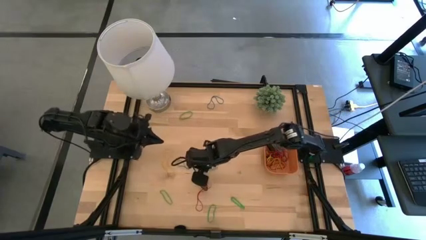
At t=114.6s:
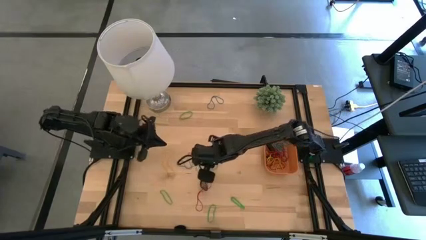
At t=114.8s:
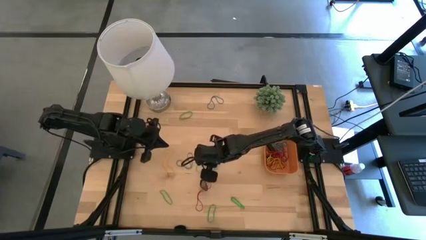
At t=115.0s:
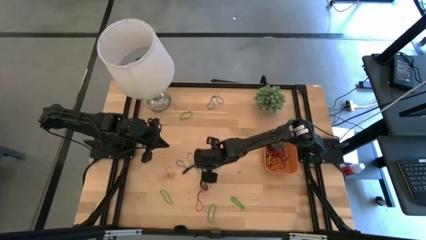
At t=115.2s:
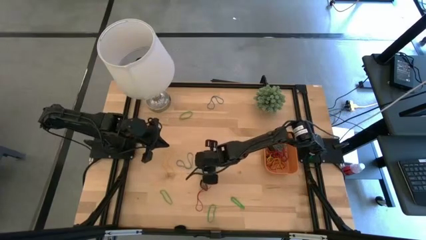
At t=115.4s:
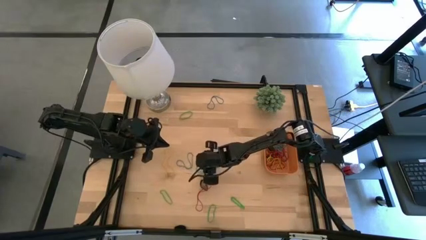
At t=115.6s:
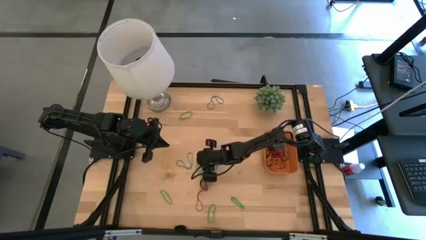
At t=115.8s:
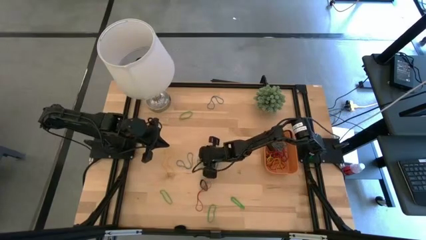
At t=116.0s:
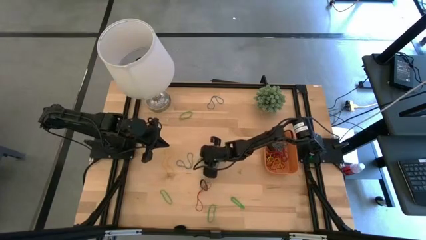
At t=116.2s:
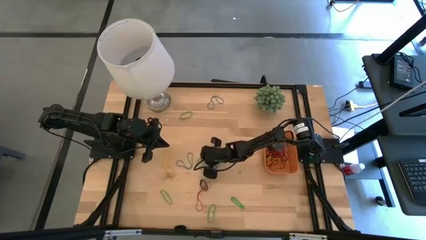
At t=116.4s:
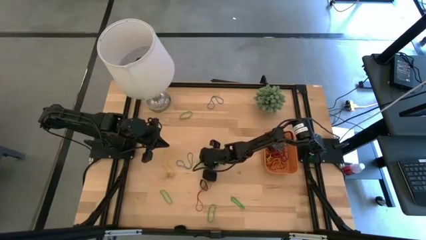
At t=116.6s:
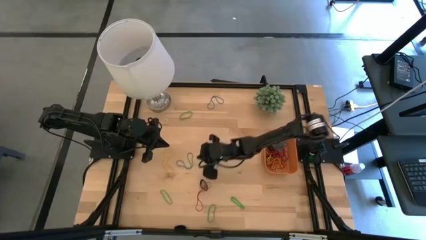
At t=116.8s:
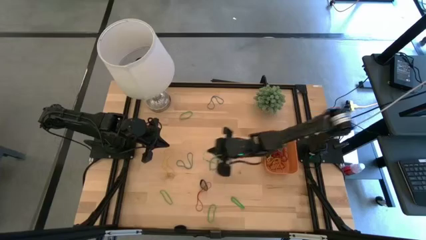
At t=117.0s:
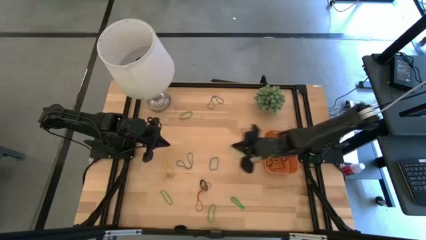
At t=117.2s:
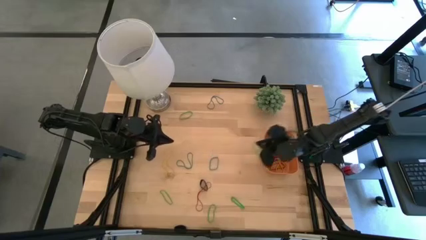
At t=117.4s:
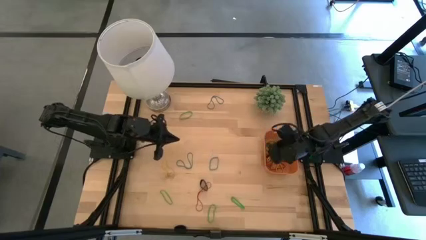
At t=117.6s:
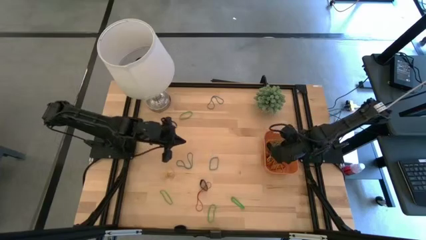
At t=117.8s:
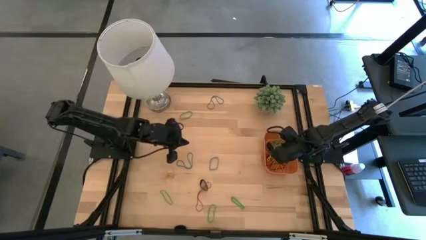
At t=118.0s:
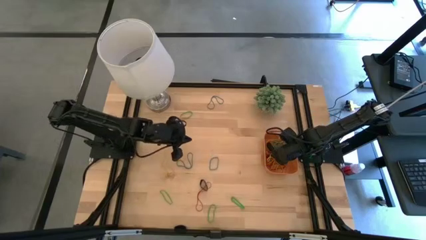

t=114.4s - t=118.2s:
Task: Pick and place rubber bands into bin
Put the green rubber band into the orange bin

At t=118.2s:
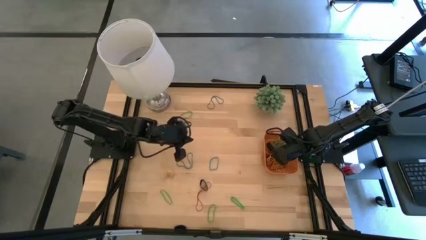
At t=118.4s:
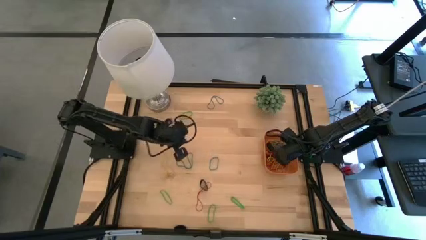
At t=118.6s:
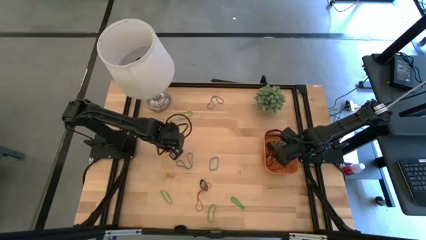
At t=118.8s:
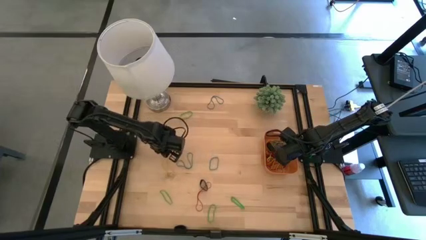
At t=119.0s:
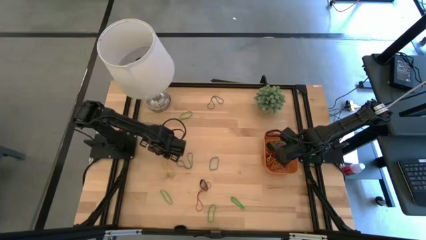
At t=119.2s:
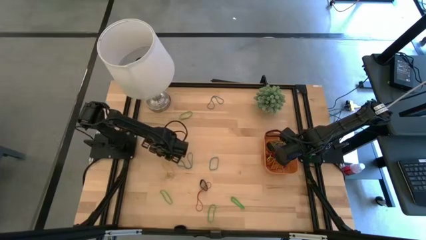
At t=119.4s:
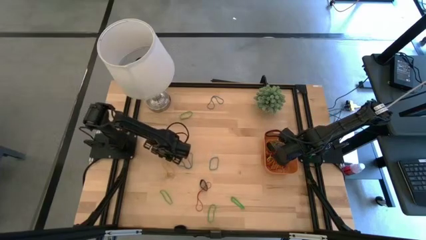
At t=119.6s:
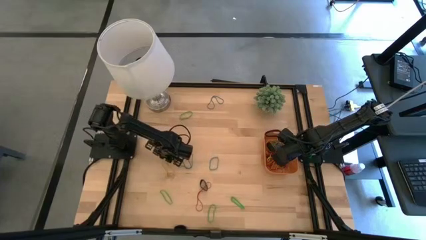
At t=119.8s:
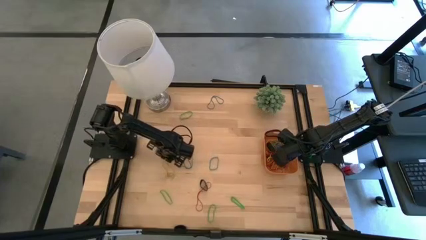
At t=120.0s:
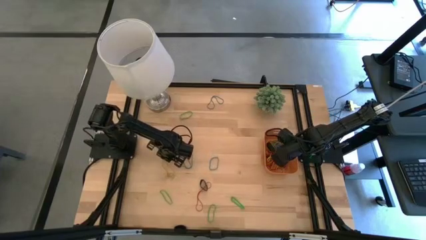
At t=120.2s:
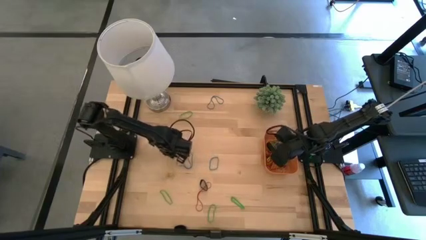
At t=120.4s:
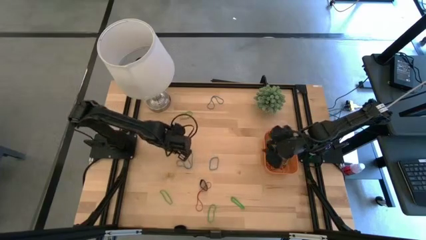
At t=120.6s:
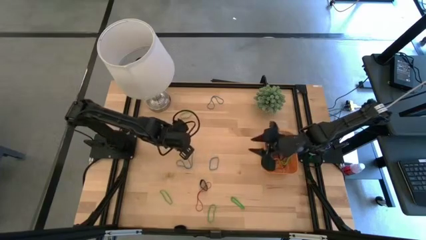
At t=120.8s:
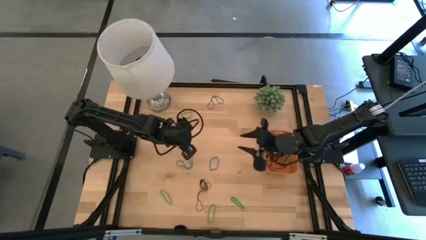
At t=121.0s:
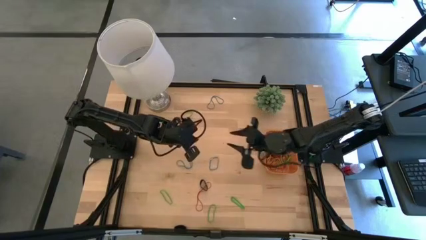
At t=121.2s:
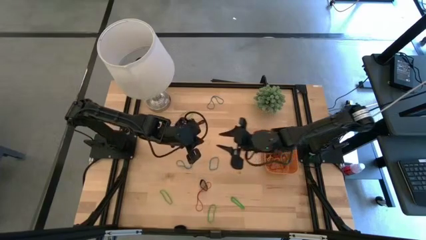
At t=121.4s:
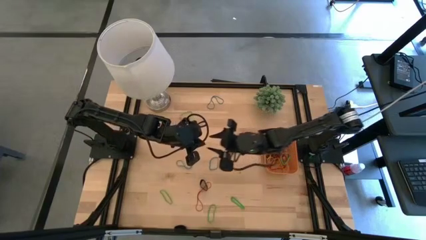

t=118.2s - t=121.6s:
Put the yellow rubber band into the orange bin

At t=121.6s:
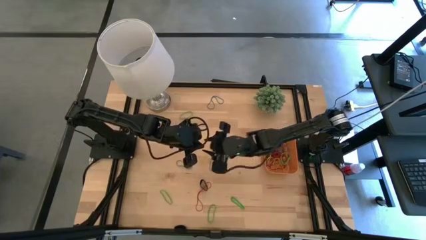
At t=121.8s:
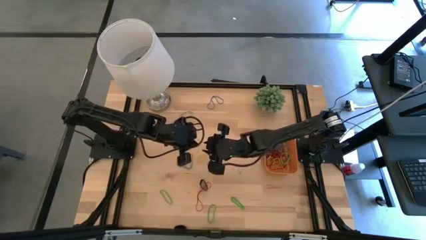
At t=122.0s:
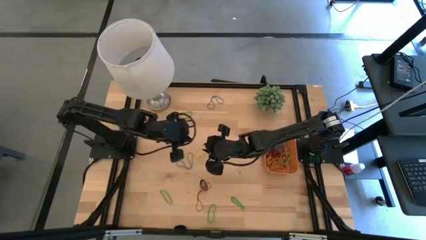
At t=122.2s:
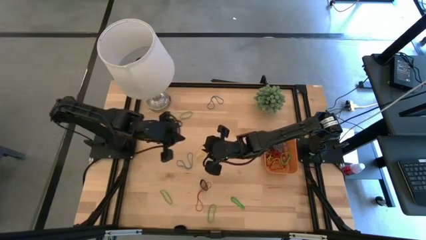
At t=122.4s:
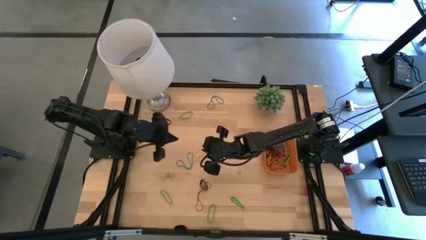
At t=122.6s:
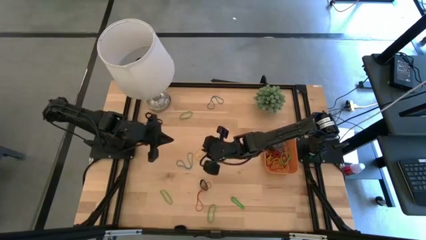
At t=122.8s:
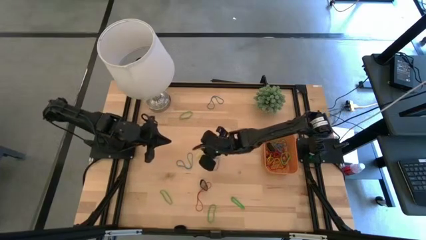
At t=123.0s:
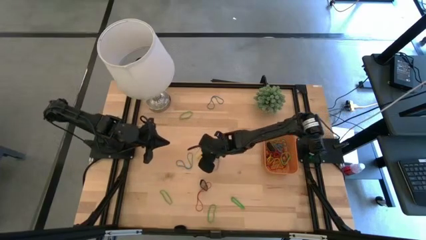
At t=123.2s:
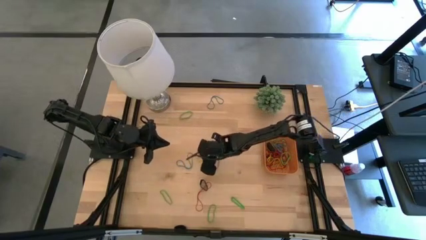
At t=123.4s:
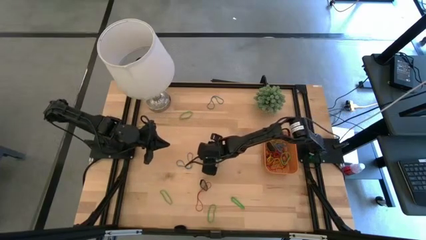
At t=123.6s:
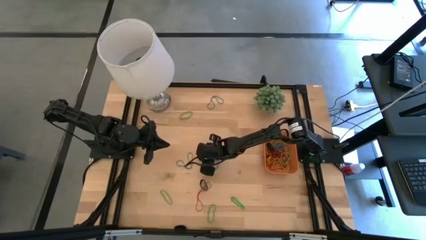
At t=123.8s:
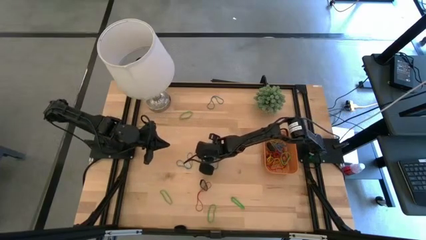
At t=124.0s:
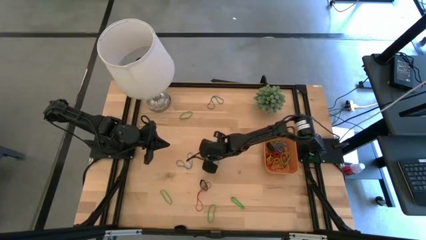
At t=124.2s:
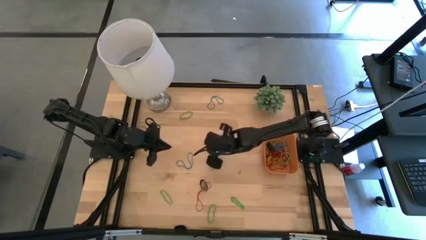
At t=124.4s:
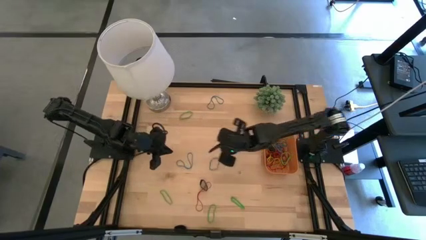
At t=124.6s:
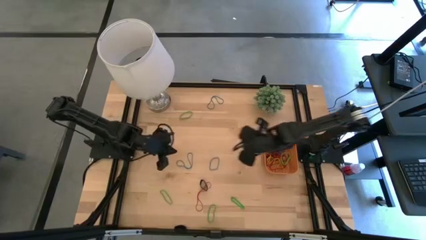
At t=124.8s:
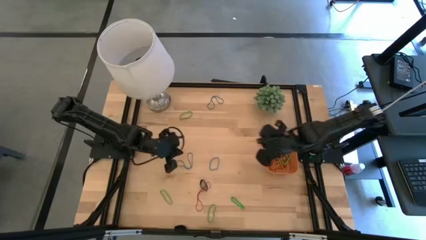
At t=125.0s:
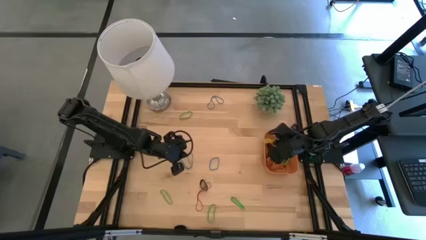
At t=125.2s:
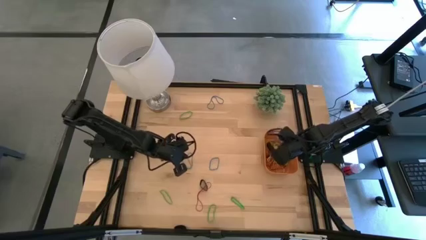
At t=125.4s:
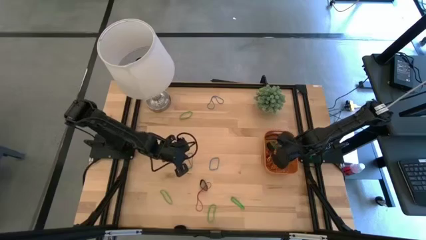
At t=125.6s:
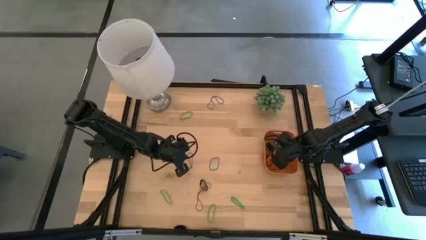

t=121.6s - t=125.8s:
Put the yellow rubber band into the orange bin

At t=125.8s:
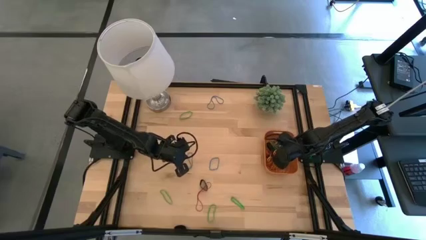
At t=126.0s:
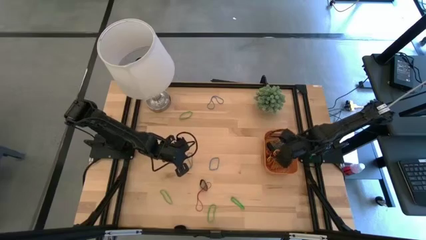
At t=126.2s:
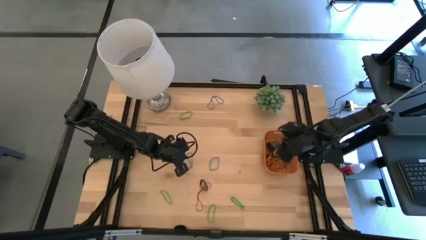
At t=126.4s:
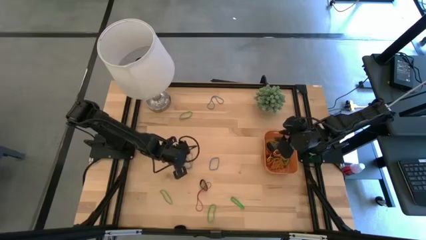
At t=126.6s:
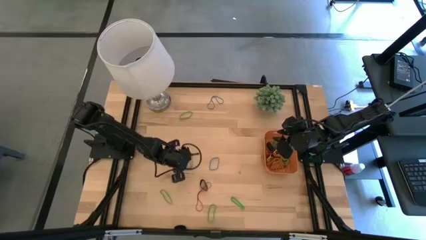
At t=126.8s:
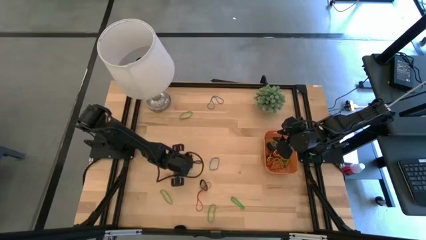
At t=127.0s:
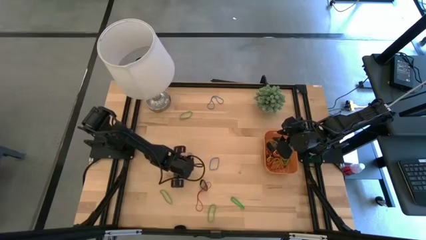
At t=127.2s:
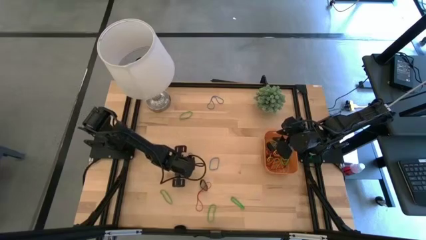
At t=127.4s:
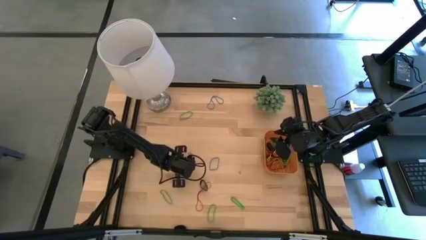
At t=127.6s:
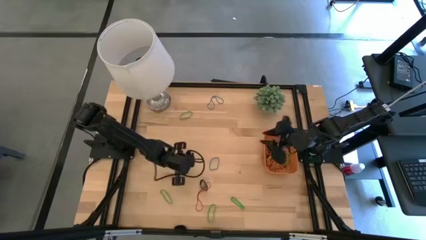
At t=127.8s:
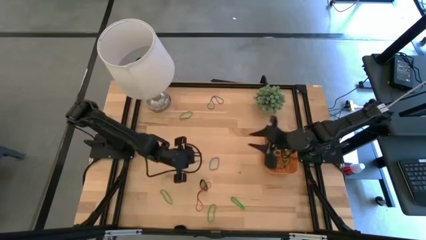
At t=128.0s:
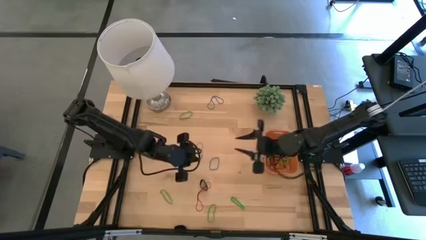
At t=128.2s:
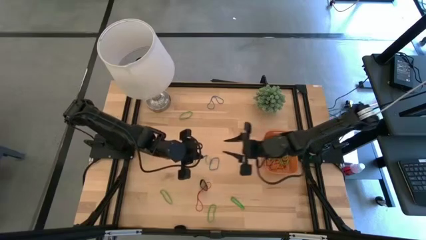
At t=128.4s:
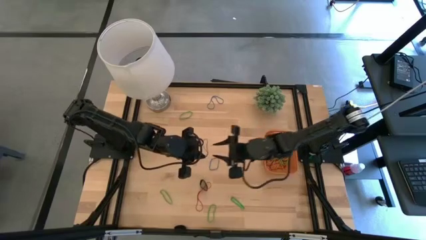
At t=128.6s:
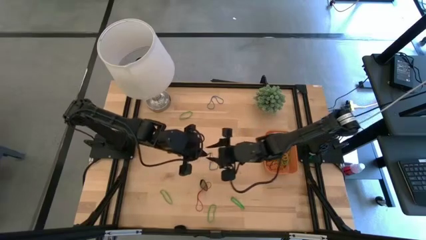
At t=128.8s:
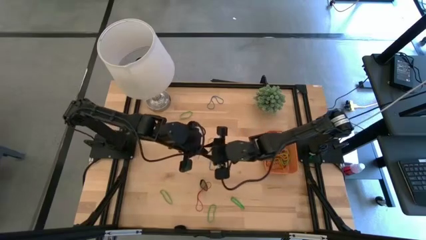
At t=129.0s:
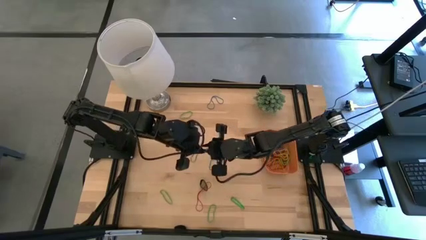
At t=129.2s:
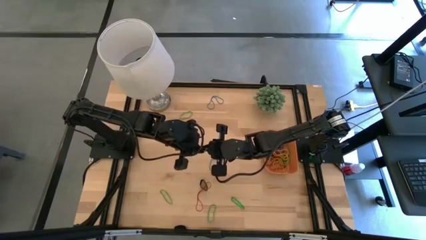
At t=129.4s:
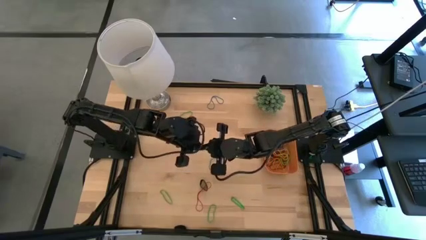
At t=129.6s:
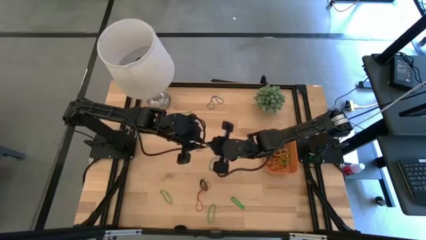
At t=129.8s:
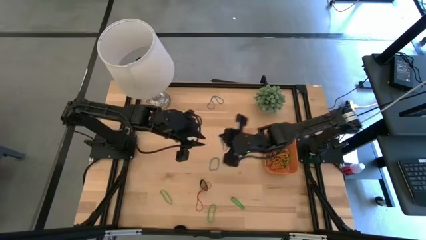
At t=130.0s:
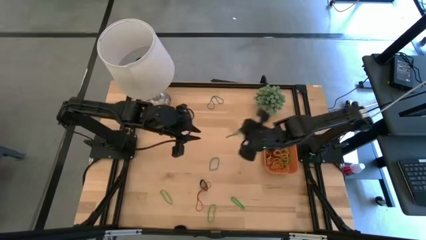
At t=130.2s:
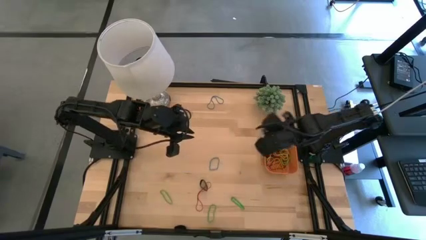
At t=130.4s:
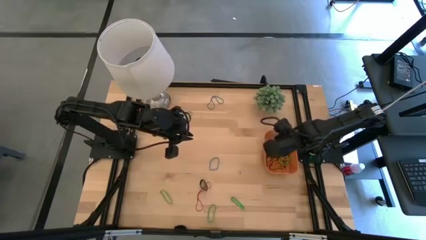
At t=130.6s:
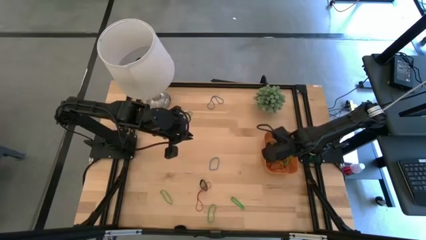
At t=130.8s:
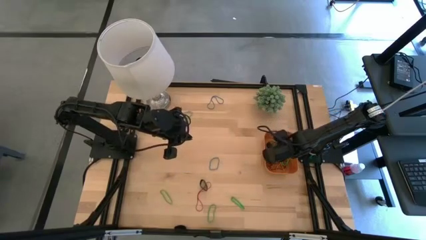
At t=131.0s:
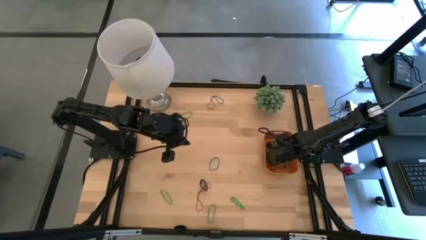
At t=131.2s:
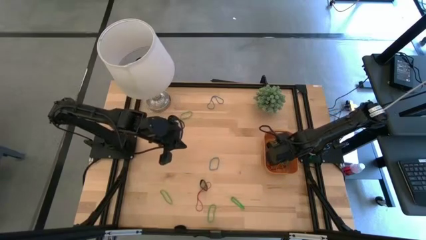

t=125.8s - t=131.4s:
Put the blue rubber band into the orange bin
